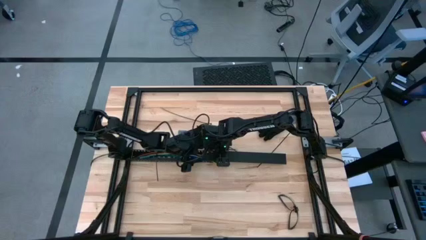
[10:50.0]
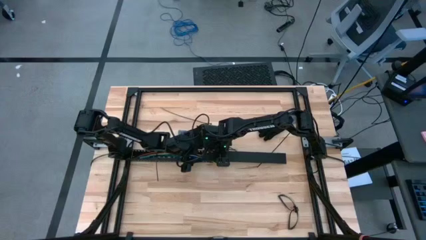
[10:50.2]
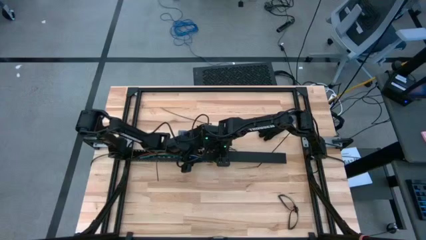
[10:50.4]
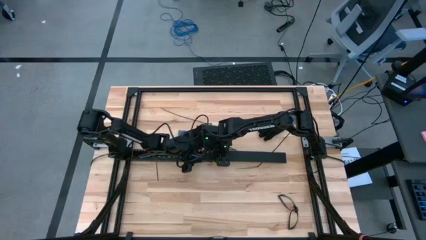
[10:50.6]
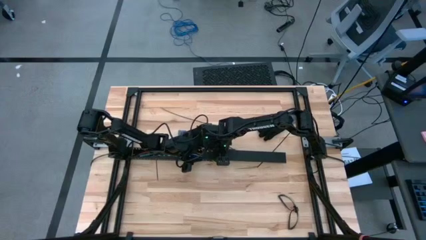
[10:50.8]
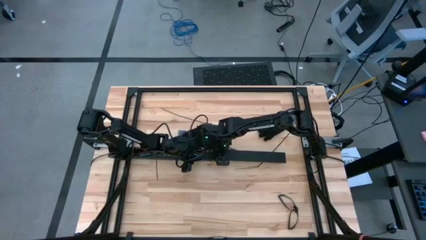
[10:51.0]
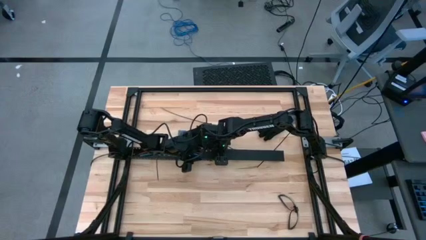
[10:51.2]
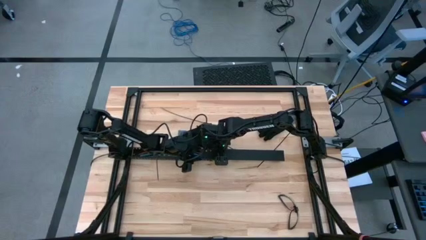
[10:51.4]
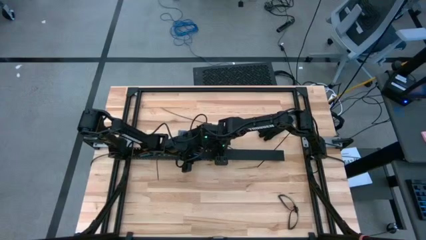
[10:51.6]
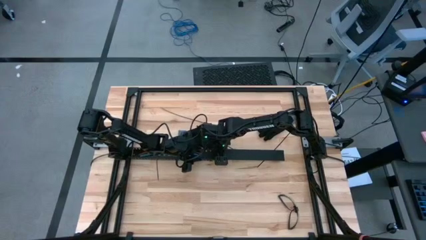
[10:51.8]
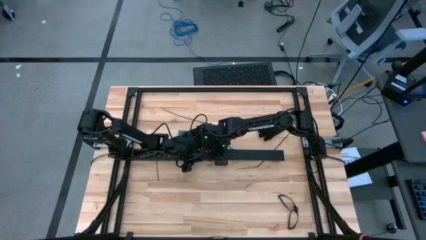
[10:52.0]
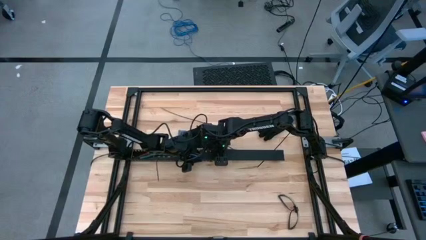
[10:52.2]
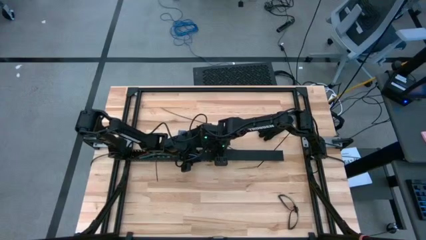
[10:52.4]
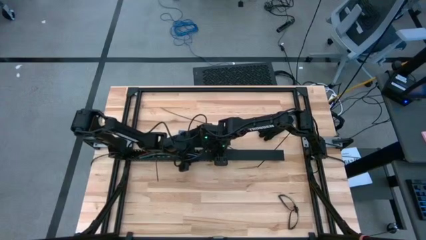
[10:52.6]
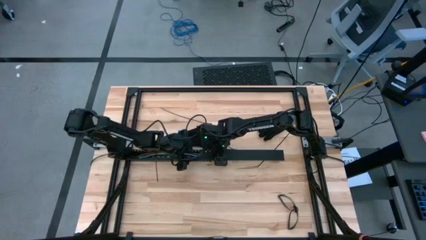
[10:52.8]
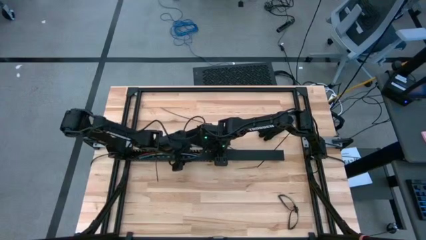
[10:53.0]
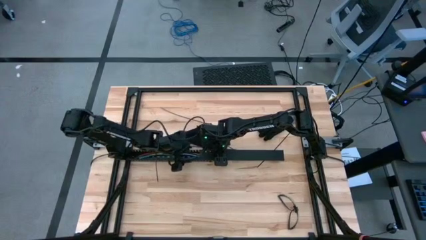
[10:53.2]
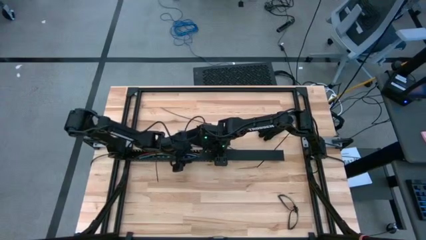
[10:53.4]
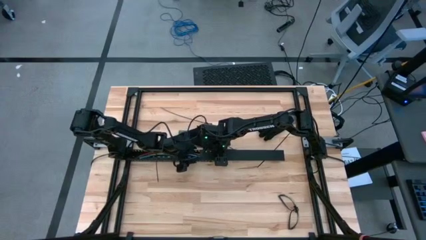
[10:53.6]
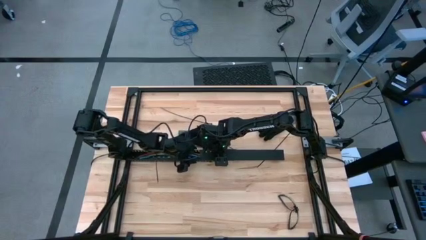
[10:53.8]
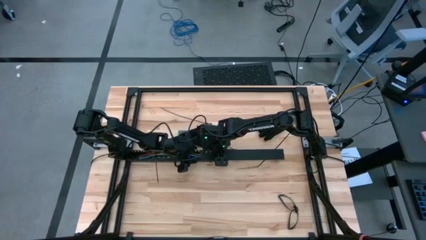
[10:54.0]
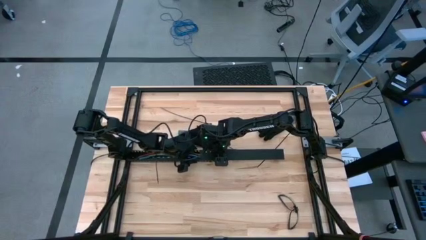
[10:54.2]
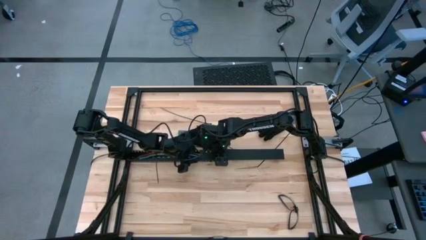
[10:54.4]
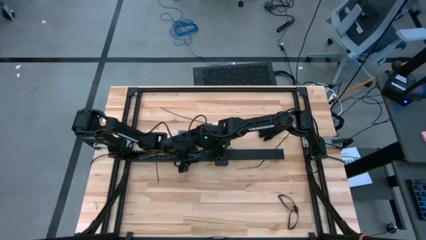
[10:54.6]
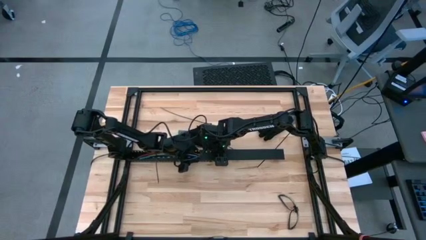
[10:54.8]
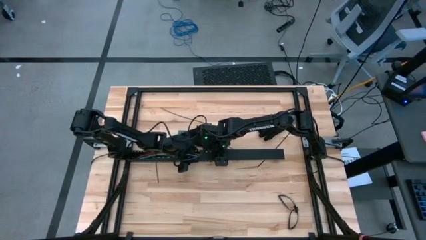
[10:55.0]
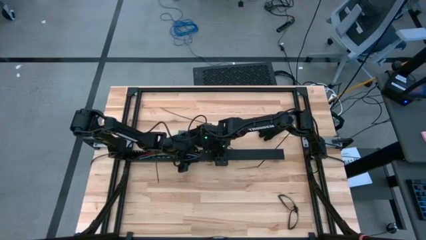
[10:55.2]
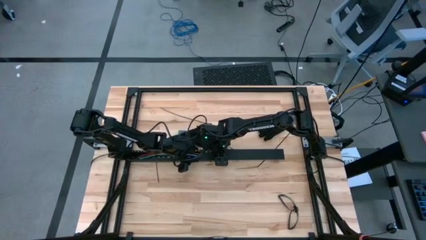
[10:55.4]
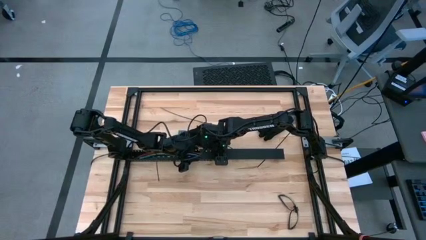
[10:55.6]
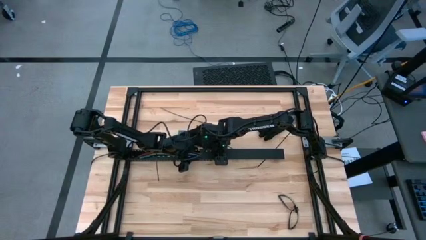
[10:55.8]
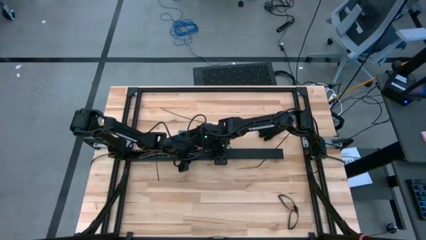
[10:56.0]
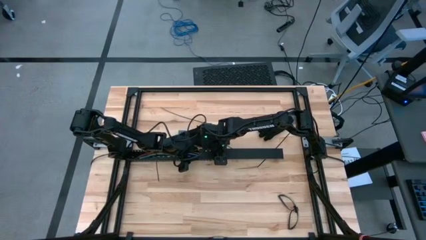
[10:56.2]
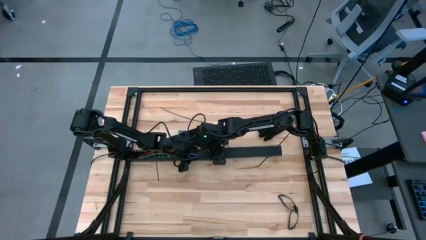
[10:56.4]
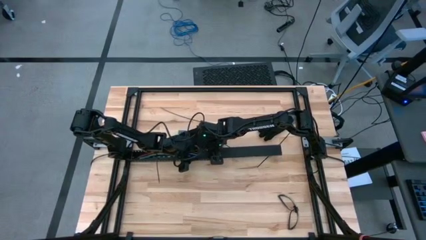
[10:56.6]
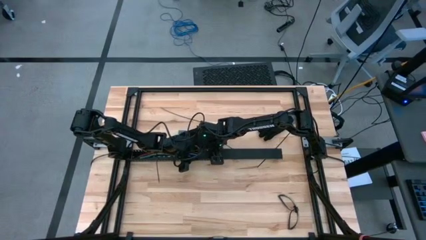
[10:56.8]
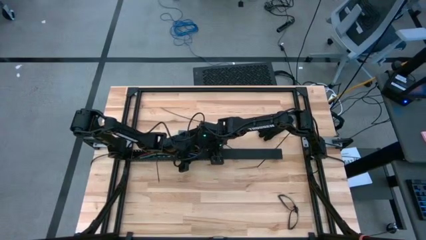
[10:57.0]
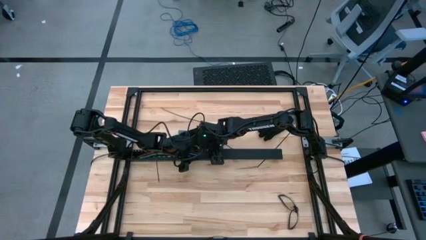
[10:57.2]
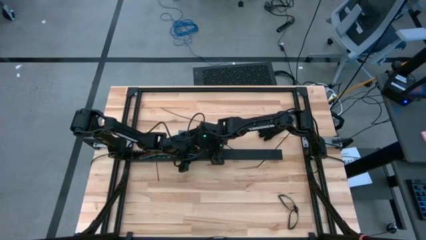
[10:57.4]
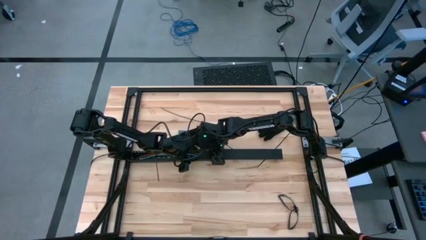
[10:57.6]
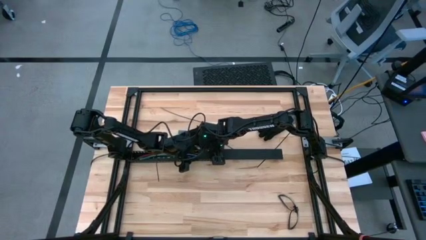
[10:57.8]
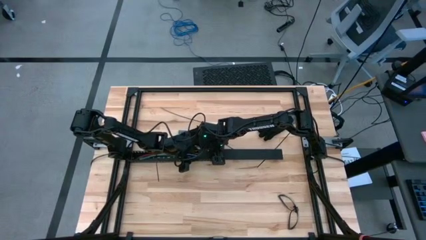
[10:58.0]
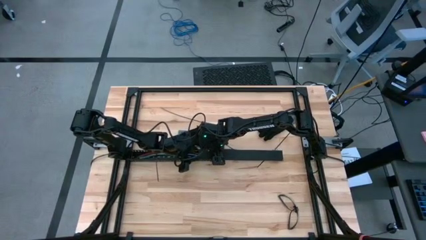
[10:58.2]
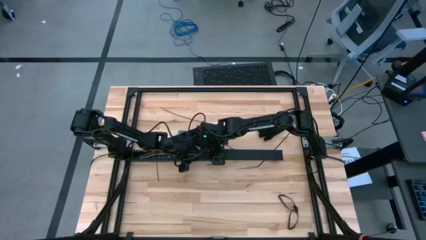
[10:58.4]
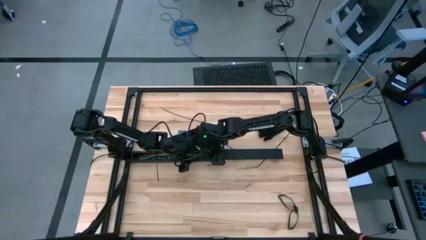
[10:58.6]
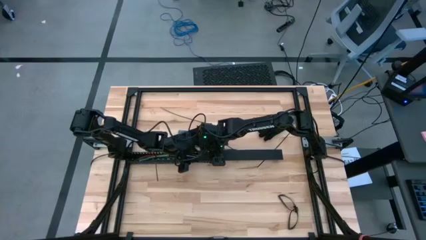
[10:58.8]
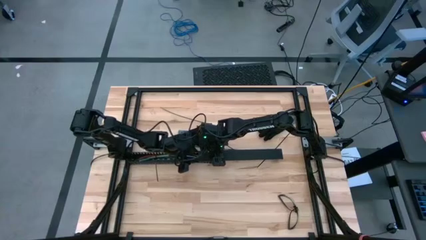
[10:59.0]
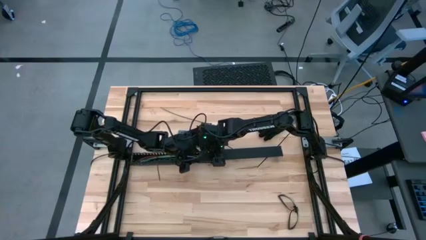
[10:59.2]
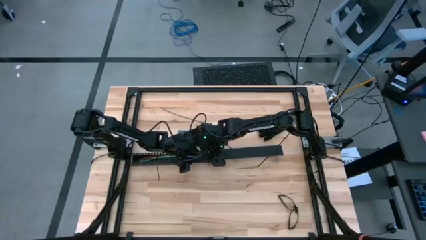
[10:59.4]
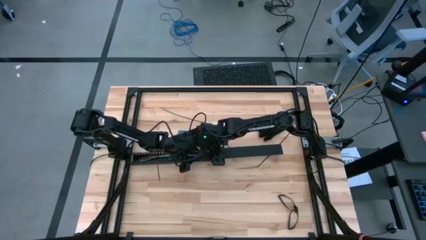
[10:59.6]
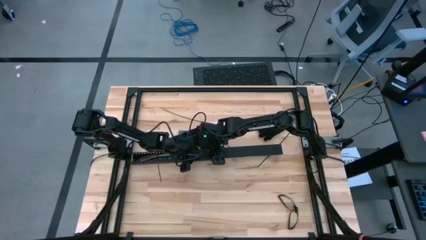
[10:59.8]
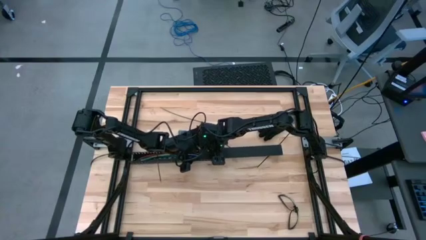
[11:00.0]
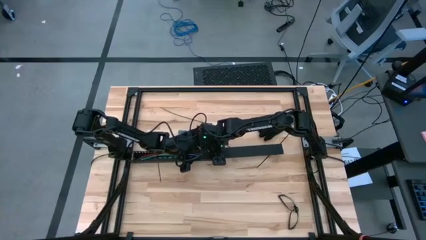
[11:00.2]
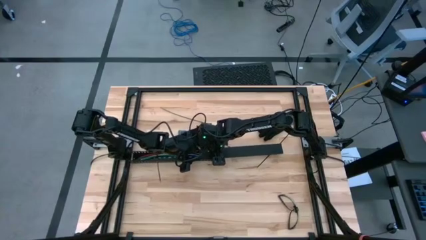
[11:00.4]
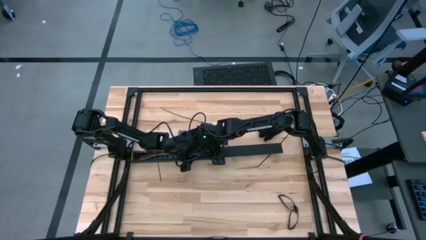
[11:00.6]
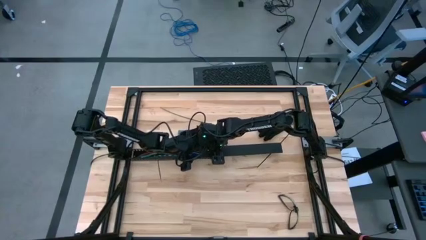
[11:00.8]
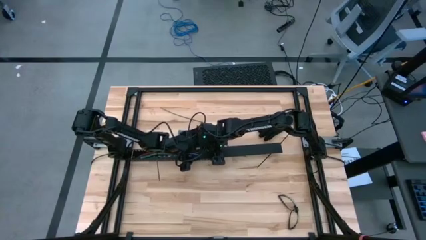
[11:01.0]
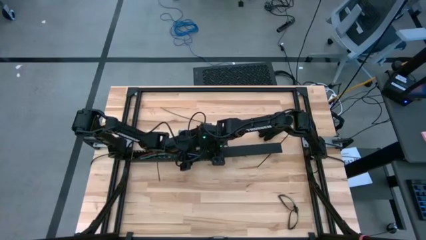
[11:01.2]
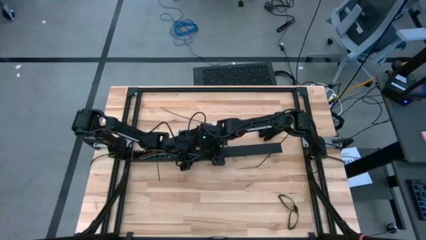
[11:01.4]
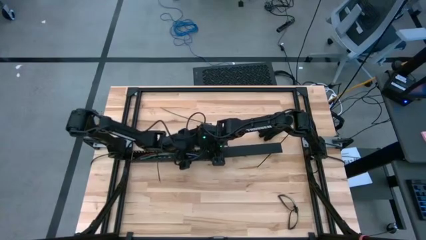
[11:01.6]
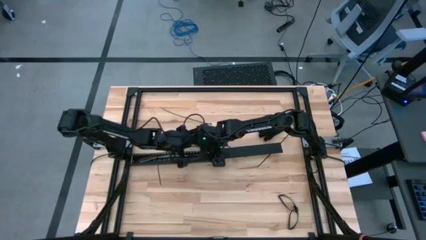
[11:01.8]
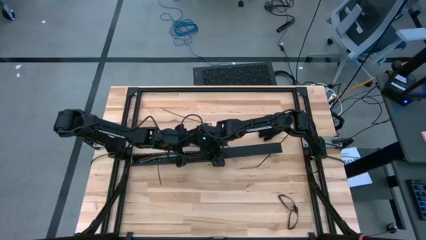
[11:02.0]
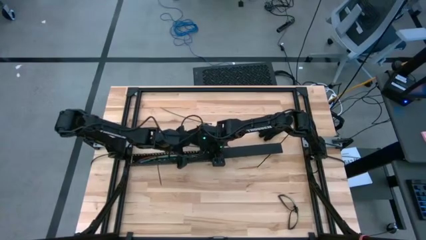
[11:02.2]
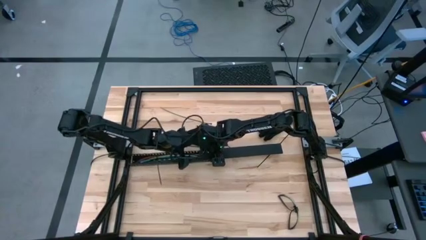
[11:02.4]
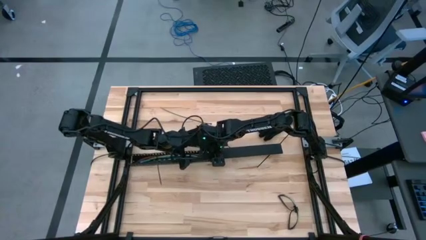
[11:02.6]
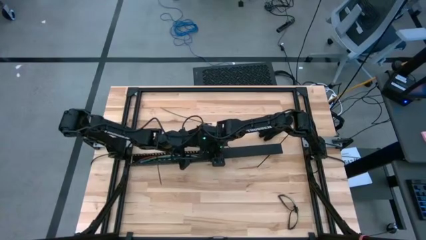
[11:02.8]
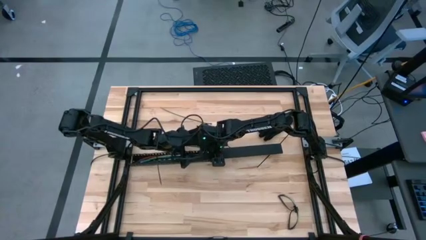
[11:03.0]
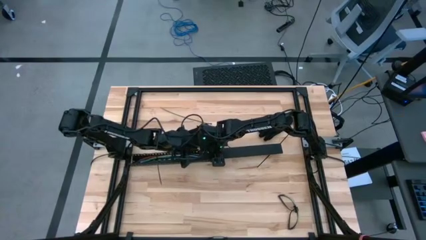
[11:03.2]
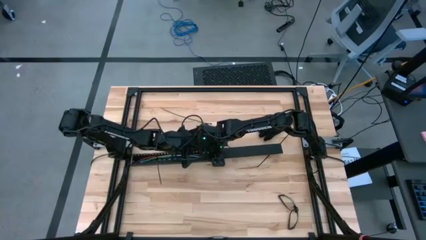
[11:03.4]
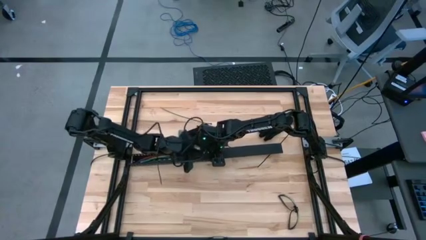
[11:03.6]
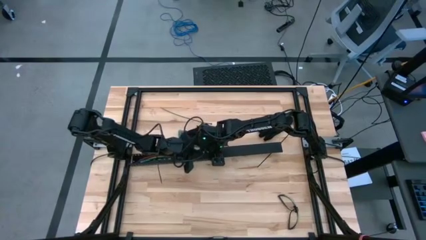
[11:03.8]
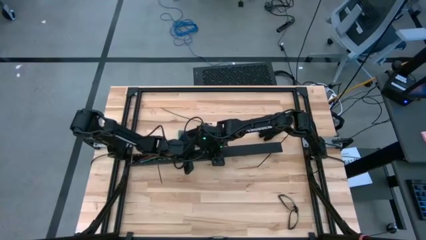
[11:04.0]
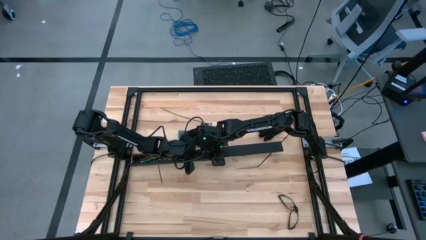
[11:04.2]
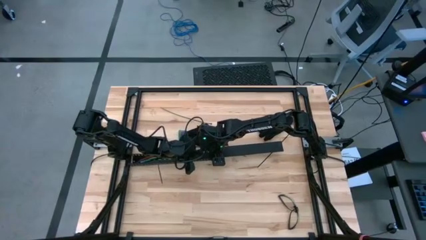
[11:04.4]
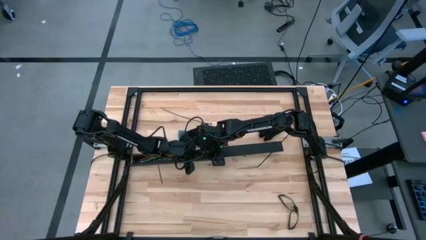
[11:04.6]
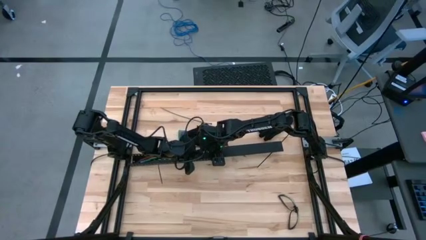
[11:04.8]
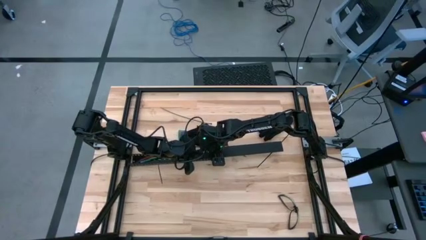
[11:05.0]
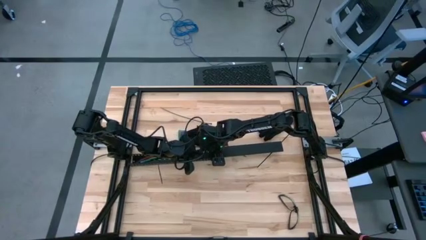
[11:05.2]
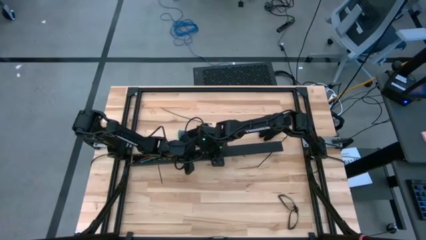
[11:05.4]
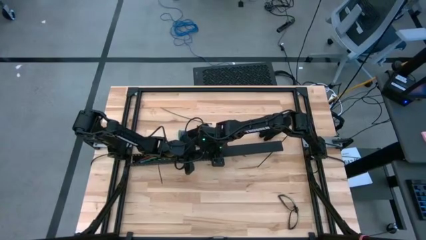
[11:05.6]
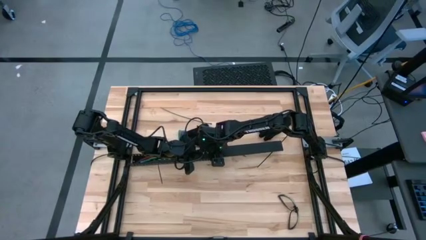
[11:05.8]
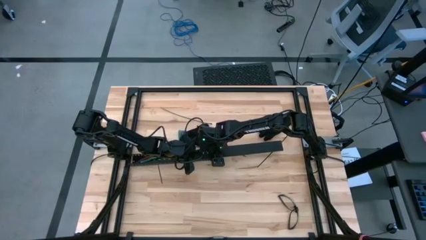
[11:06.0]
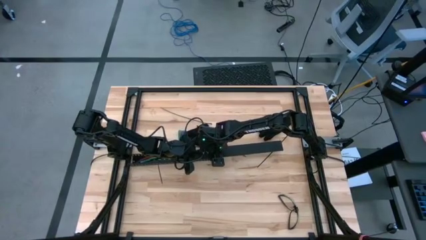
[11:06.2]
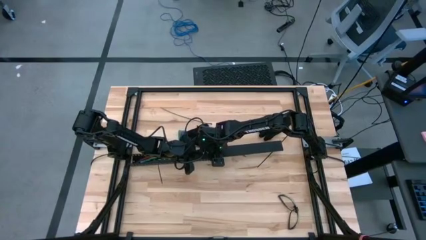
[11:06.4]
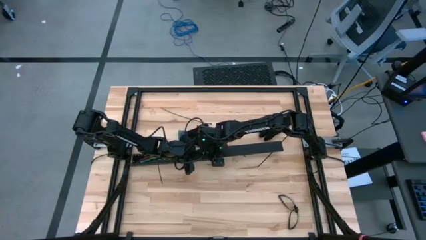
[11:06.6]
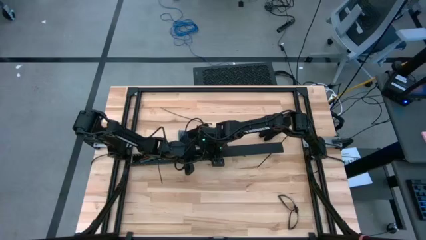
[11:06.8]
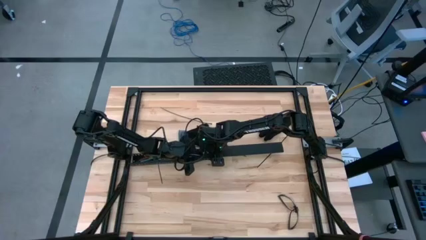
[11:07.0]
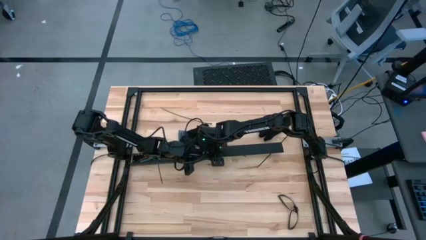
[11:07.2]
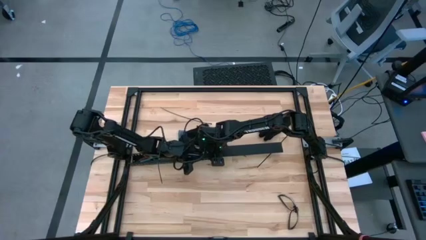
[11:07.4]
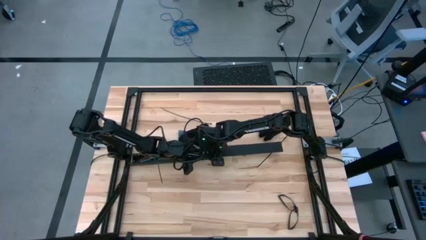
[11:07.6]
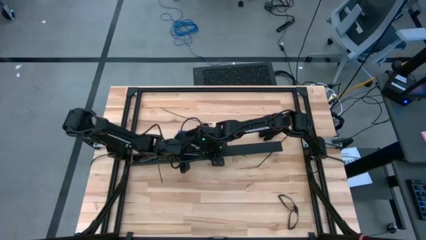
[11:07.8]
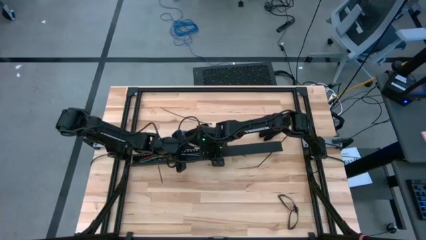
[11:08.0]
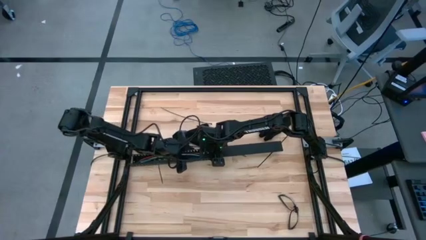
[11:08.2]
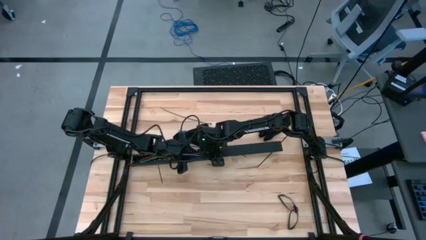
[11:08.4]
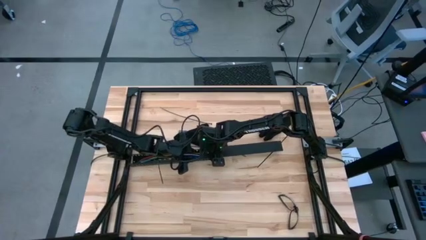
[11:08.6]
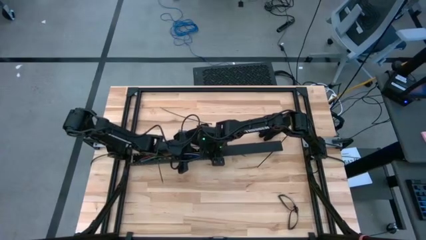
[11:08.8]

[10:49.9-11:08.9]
Task: Ziptie cables
Close the cable duct
